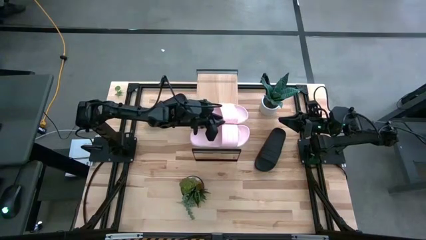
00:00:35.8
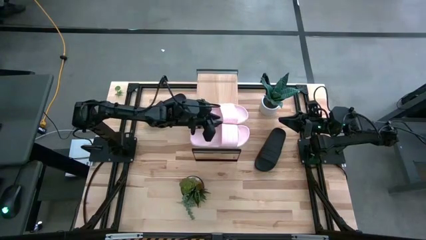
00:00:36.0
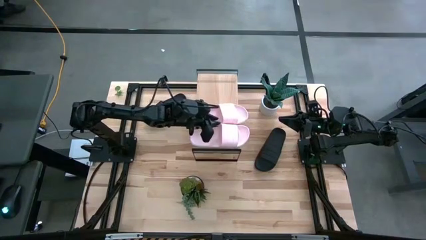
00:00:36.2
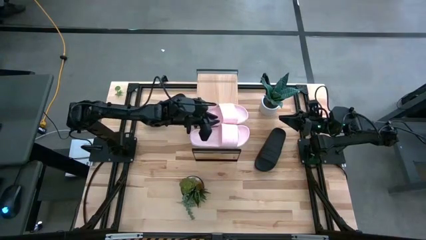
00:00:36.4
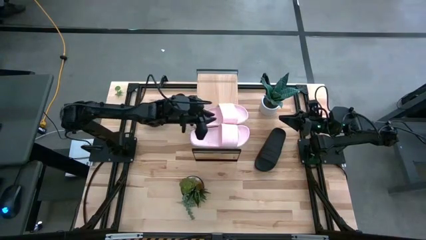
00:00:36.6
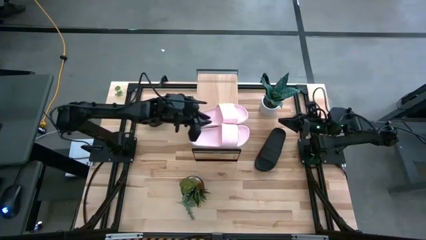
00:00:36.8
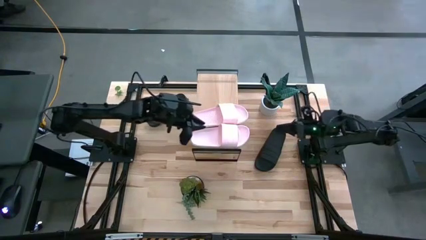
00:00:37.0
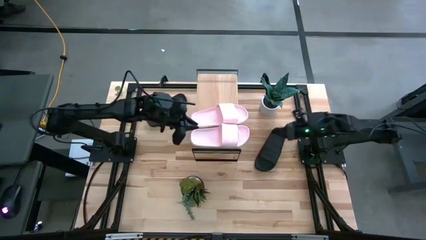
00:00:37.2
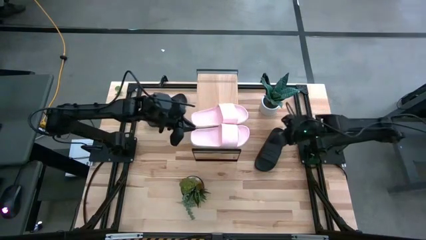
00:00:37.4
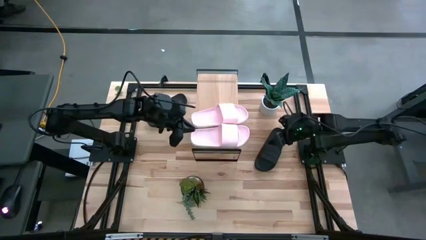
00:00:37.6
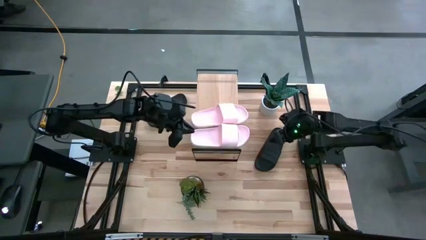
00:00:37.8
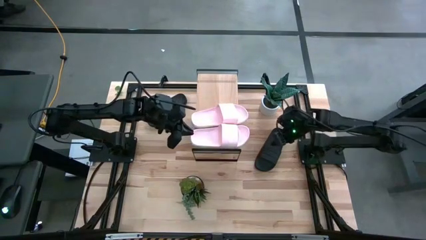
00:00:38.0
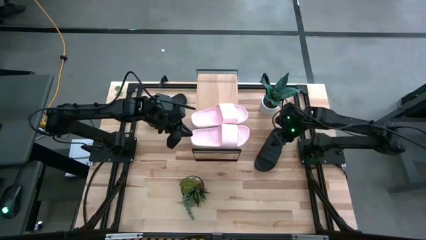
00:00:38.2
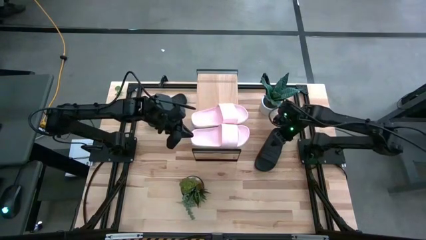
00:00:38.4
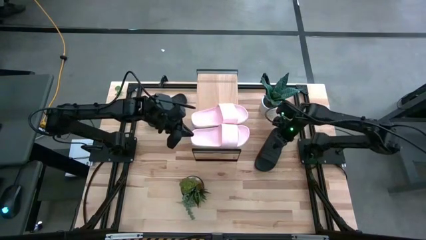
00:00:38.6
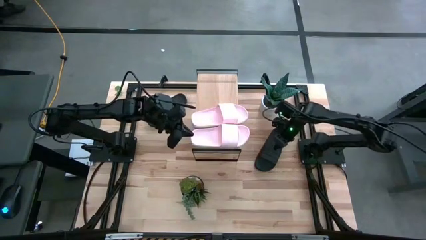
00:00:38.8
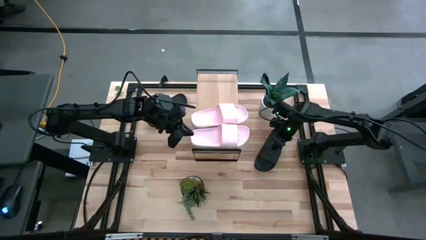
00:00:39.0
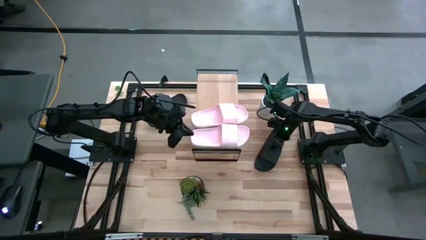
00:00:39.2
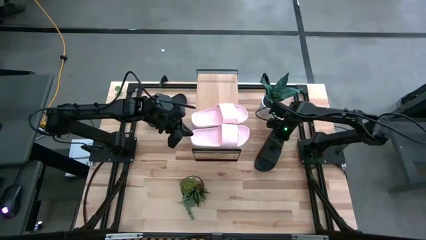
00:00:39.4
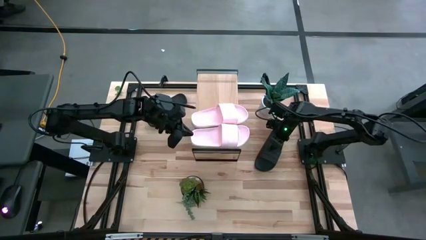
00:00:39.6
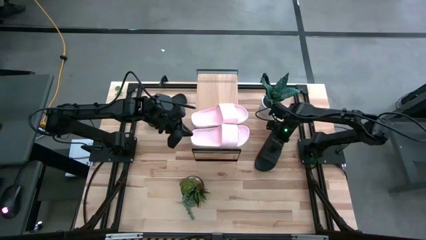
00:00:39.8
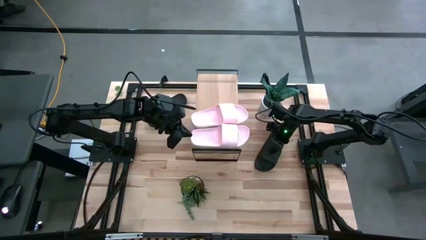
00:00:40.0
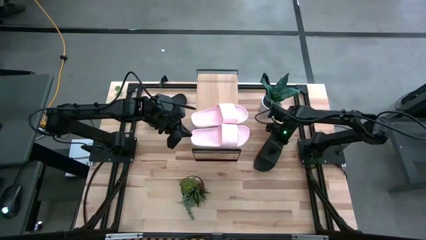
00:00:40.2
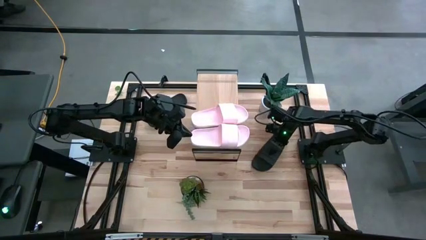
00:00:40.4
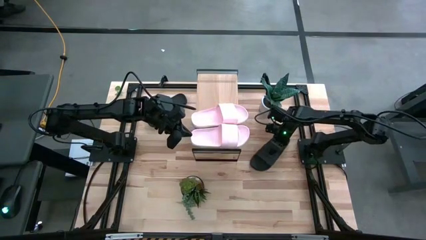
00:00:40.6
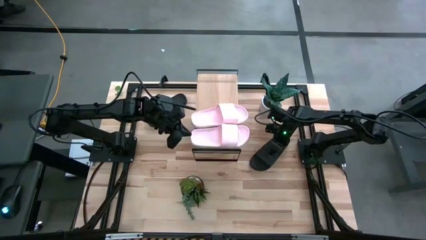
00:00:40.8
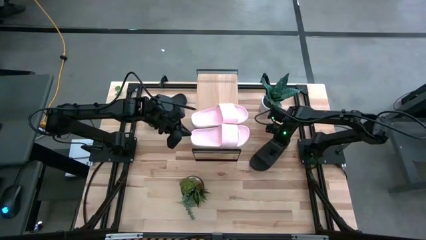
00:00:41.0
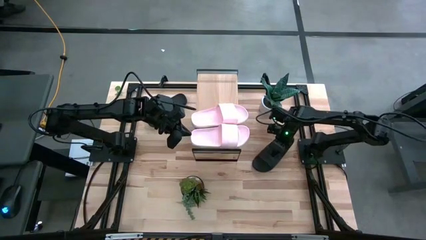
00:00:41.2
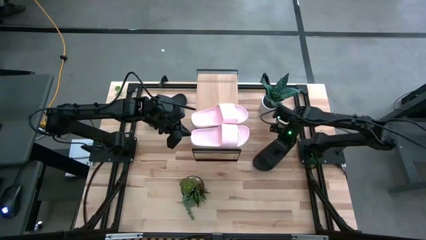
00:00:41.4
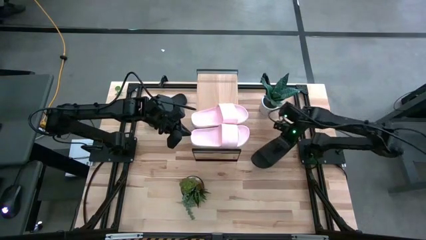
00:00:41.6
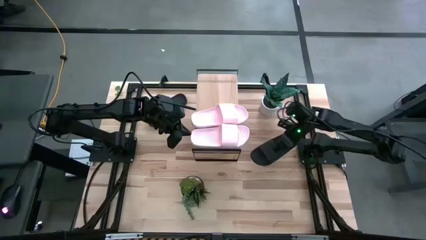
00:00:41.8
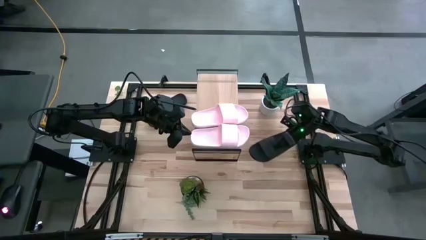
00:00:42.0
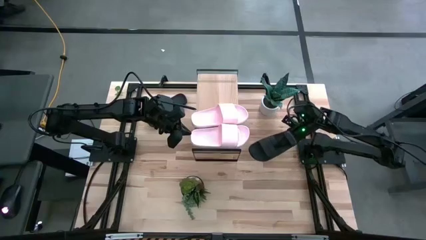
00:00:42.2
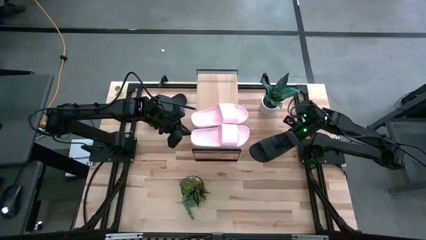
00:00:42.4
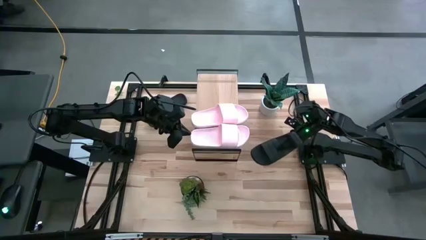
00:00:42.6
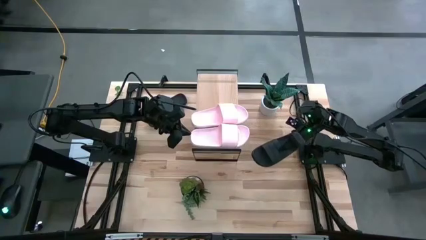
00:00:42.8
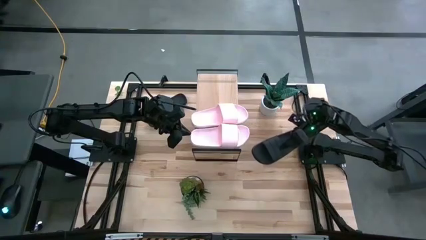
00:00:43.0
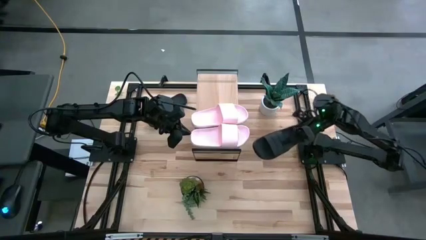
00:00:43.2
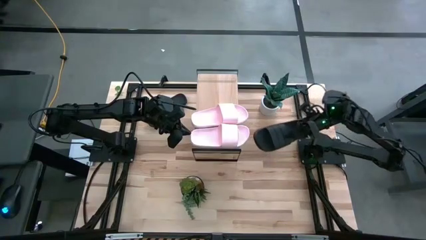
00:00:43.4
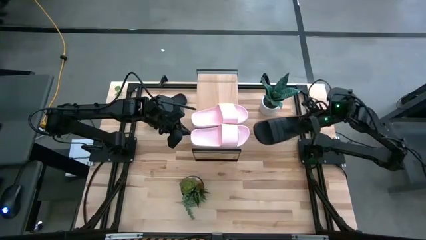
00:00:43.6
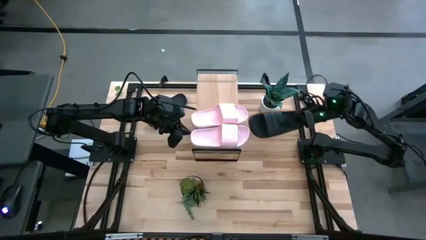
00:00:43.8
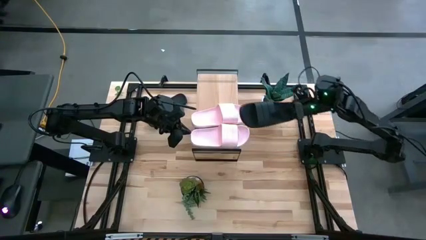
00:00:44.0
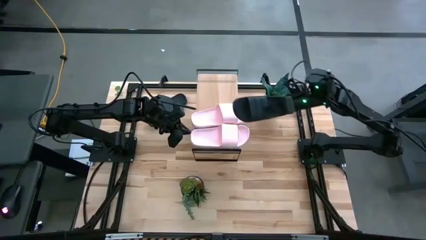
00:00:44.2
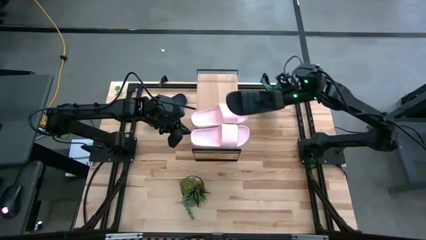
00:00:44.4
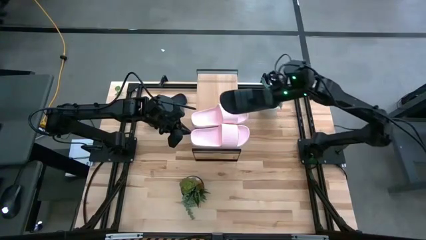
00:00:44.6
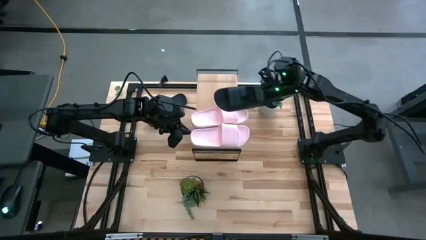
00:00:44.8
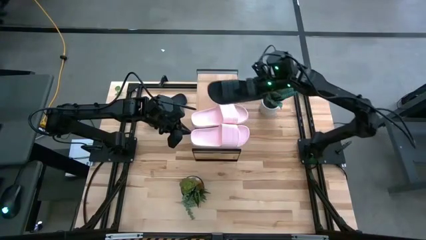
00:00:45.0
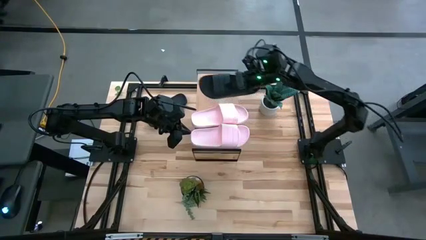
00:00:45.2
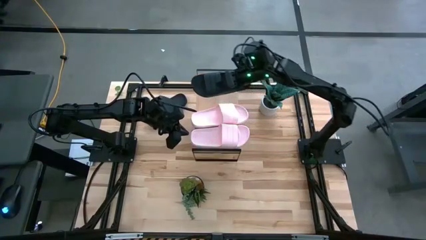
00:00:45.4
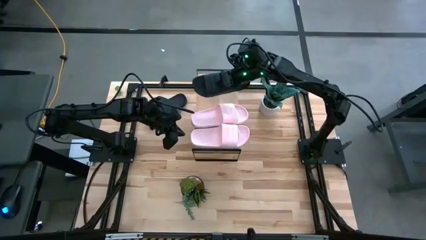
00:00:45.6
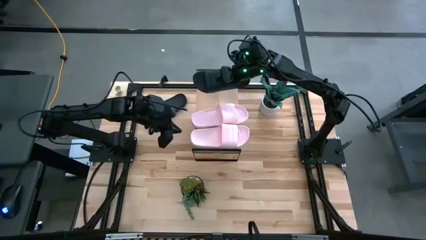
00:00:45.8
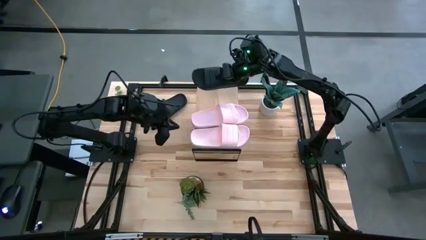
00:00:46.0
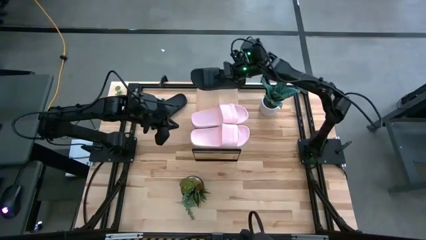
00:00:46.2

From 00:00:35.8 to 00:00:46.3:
Task: Pick and place slides into the shelf
Put the bottom black slide on the shelf
